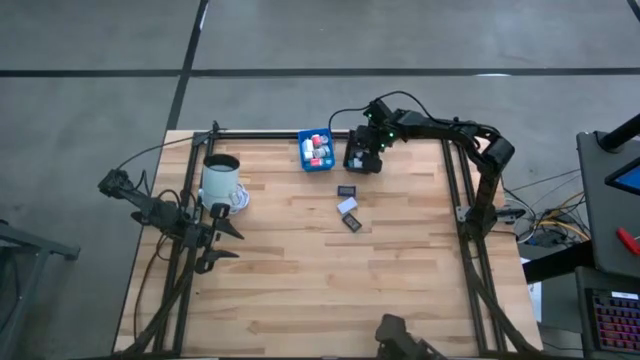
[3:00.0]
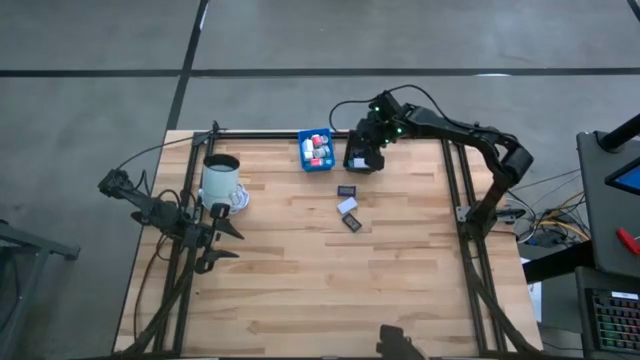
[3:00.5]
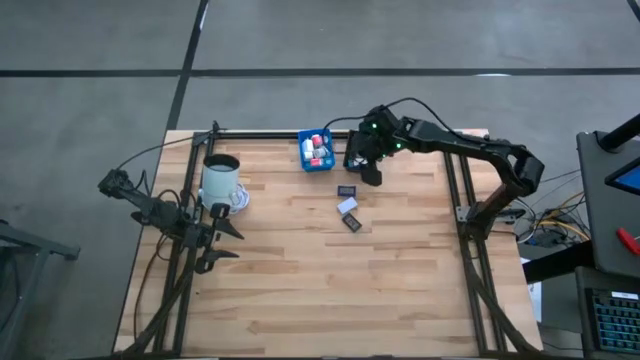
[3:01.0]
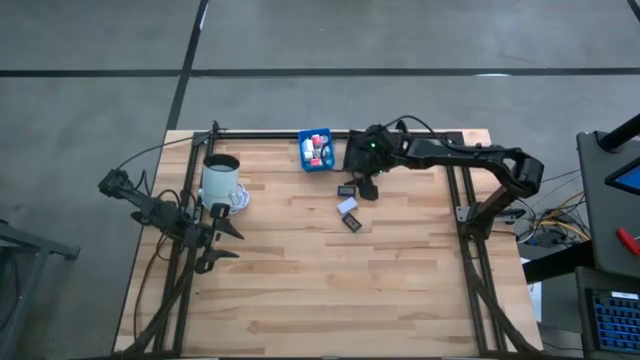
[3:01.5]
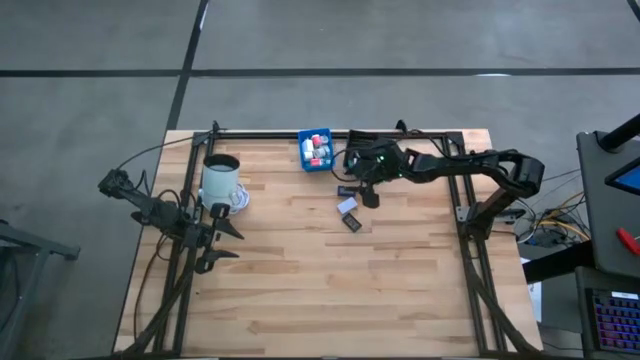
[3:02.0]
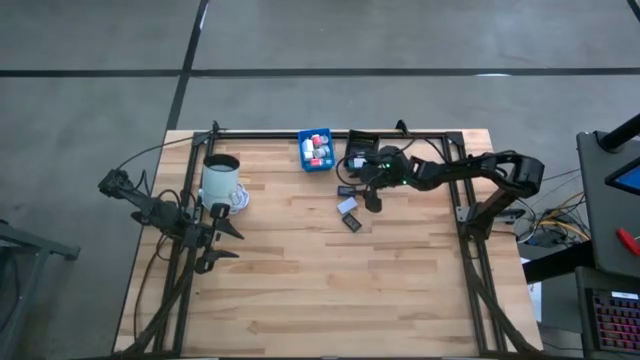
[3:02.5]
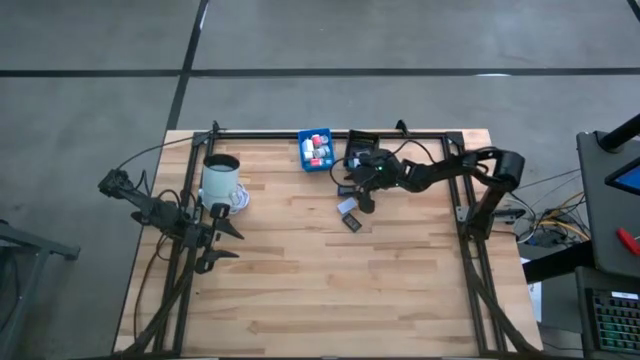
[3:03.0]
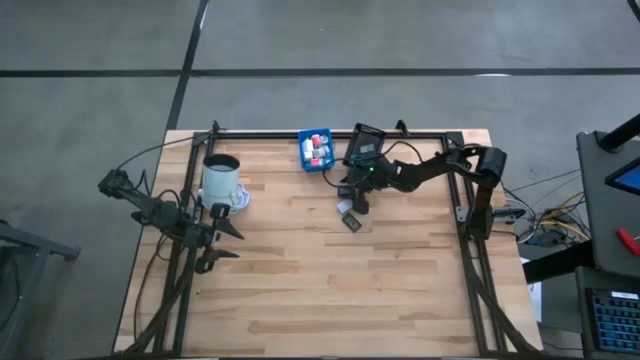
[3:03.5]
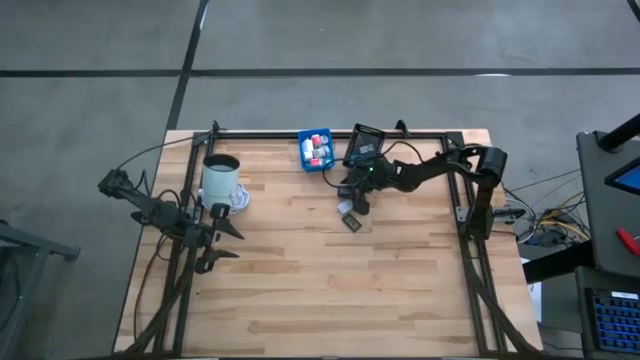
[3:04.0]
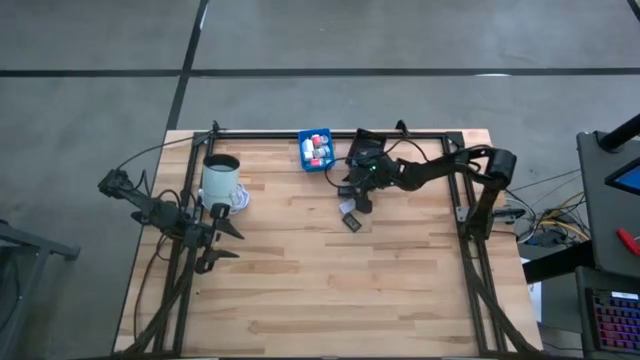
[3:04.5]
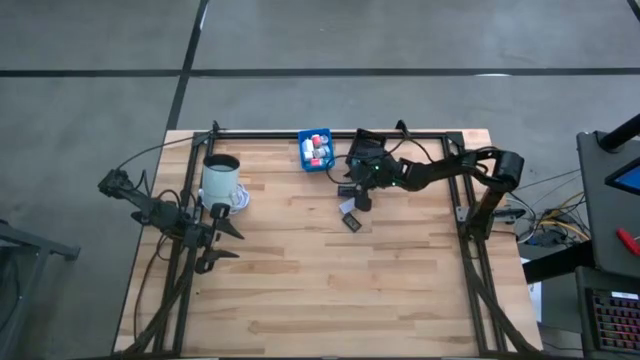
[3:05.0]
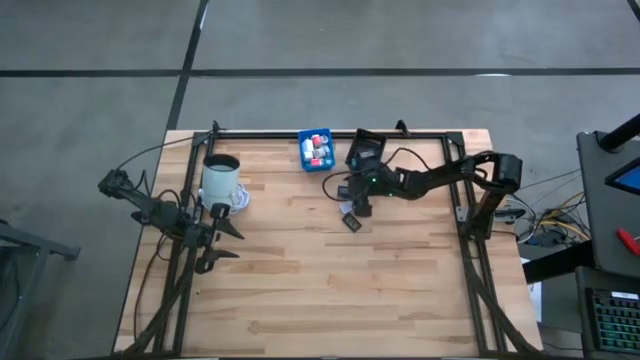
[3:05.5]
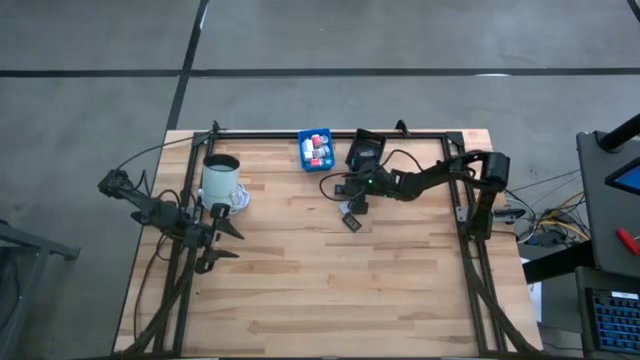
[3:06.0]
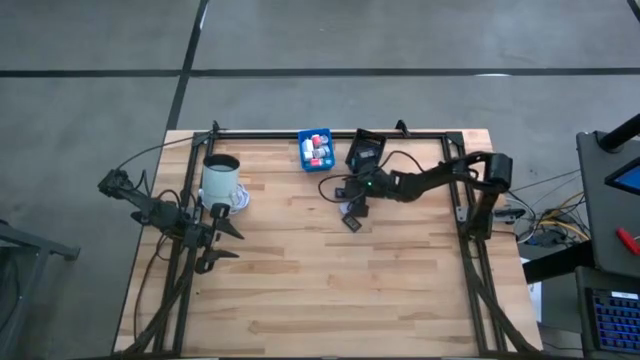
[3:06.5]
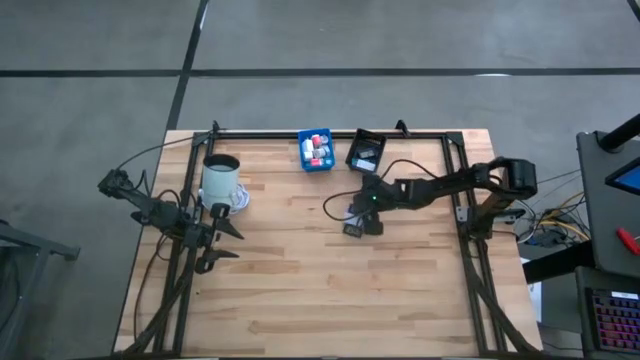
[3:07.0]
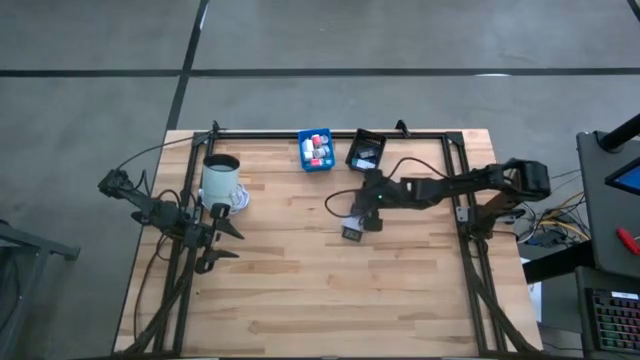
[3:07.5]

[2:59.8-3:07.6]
Task: Pick & Place Office items
Put the purple digital clock into the black basket

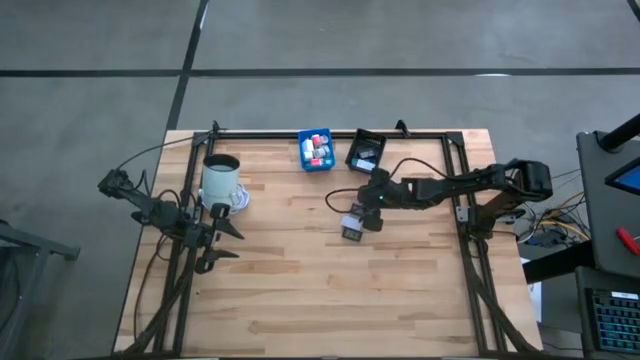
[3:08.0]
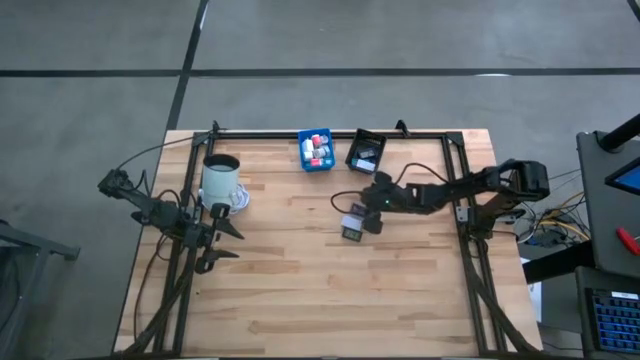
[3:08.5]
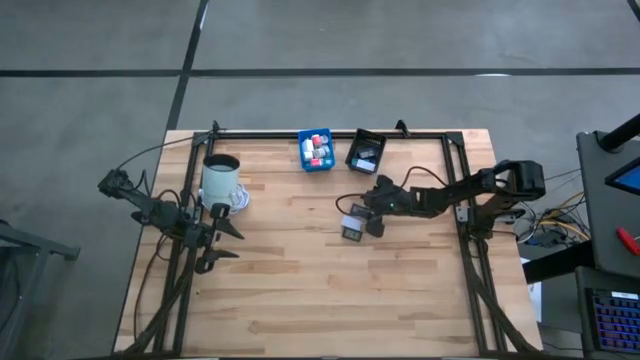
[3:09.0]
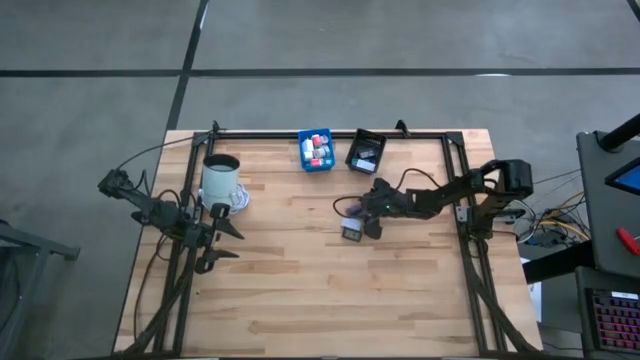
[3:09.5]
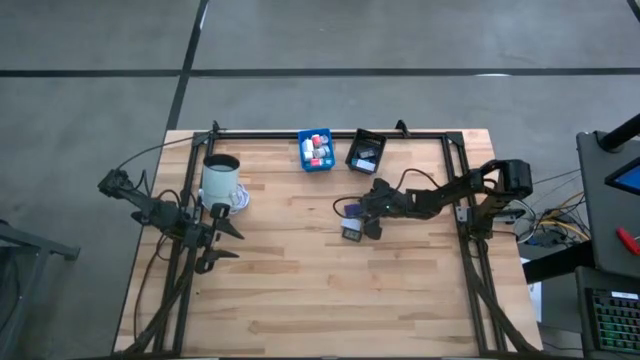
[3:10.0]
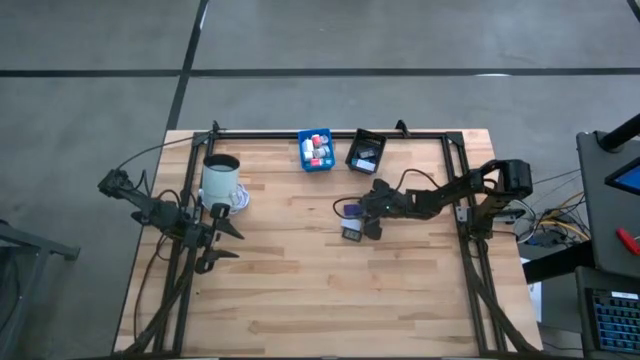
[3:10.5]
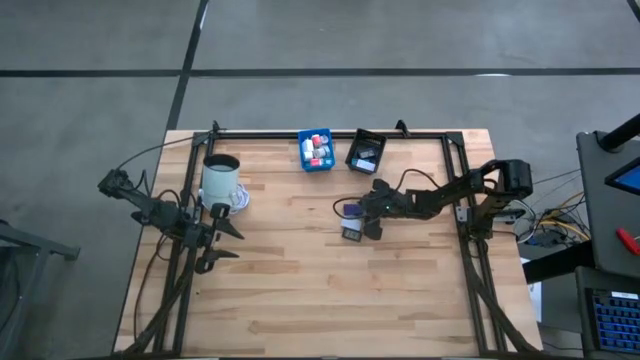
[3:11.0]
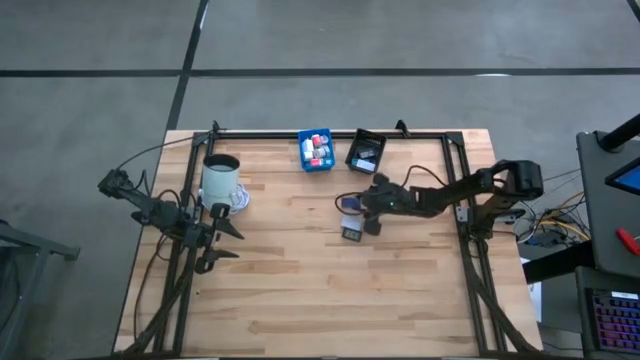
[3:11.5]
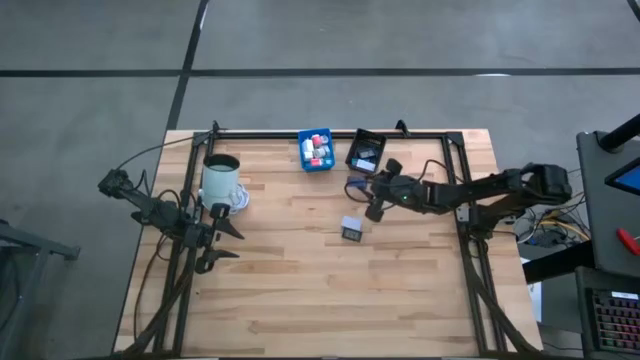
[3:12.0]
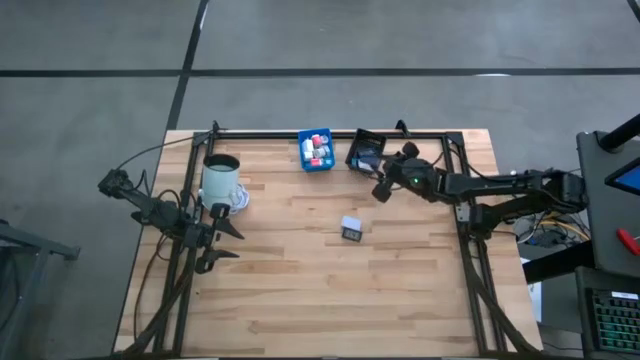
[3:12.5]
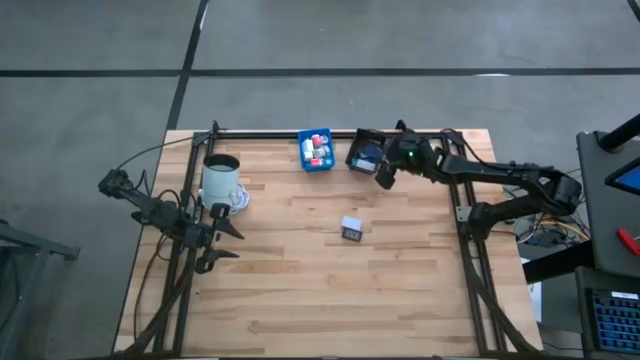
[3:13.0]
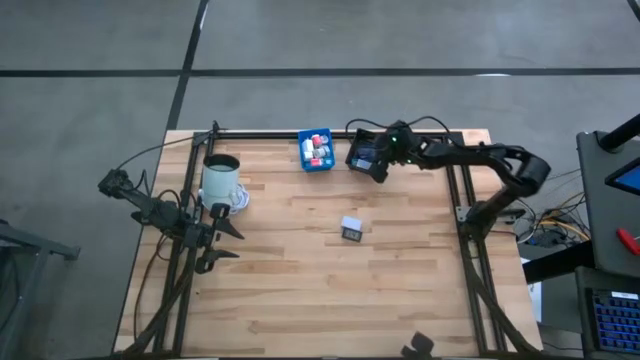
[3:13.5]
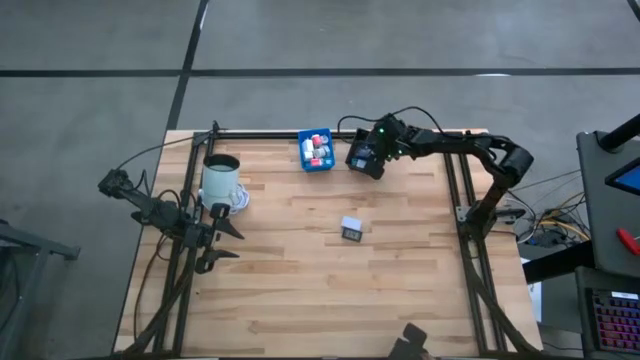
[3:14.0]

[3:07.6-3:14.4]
Put the purple digital clock into the black basket

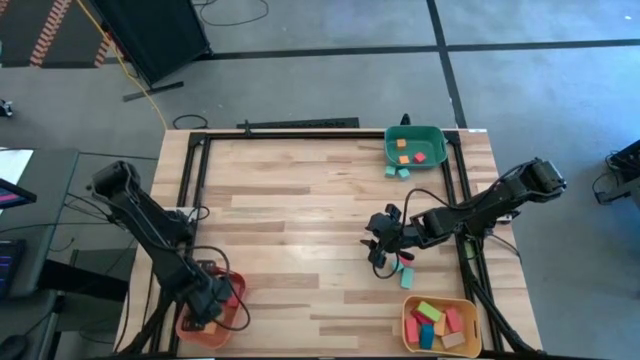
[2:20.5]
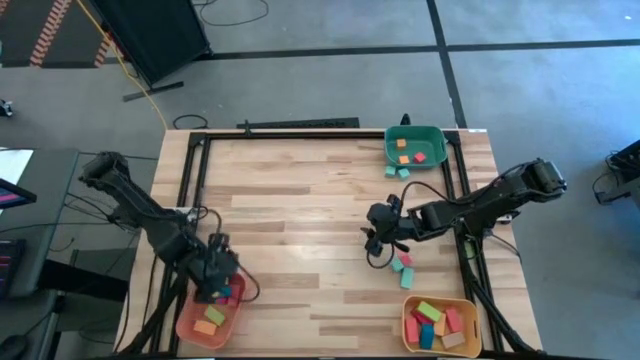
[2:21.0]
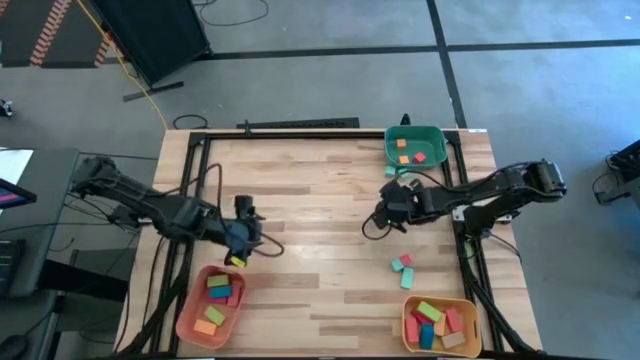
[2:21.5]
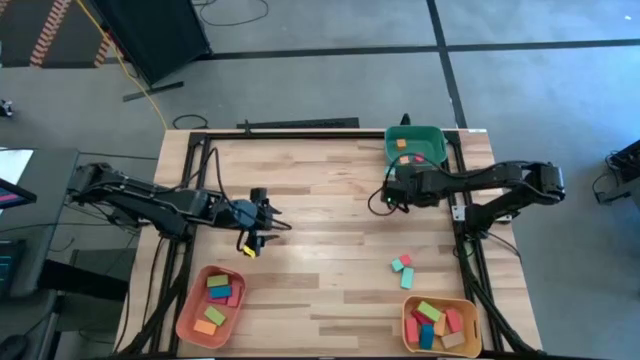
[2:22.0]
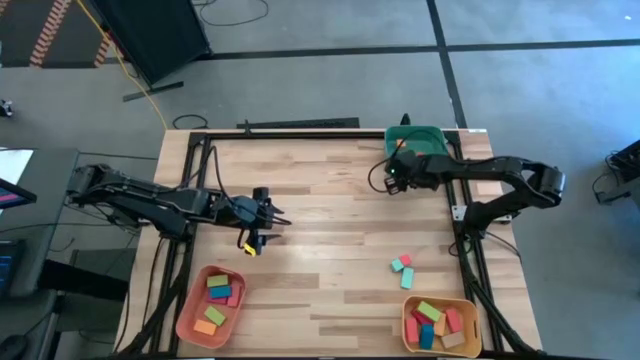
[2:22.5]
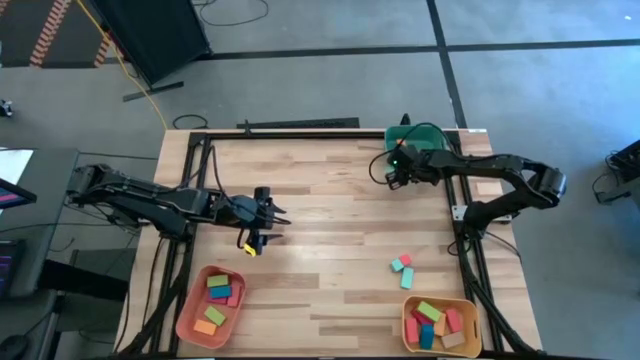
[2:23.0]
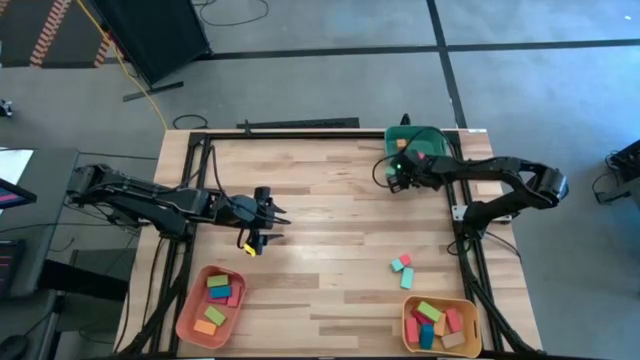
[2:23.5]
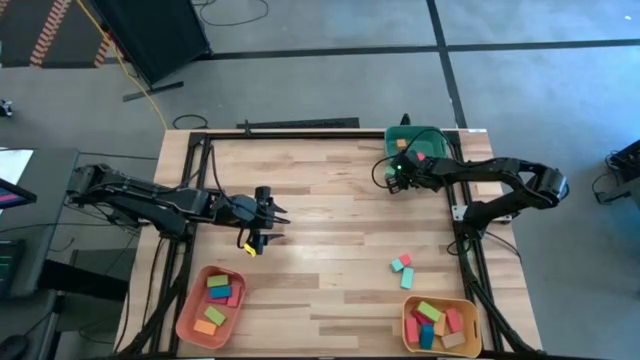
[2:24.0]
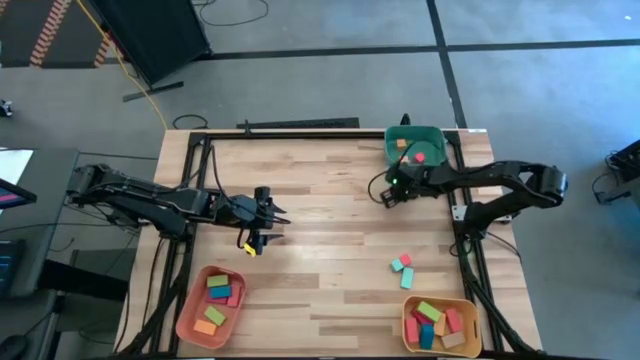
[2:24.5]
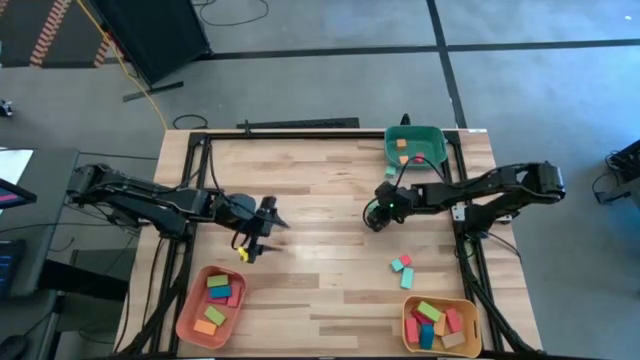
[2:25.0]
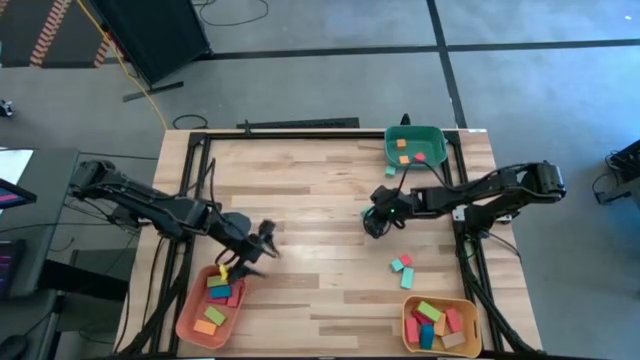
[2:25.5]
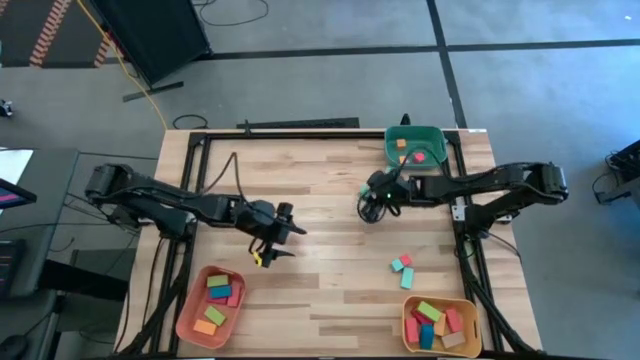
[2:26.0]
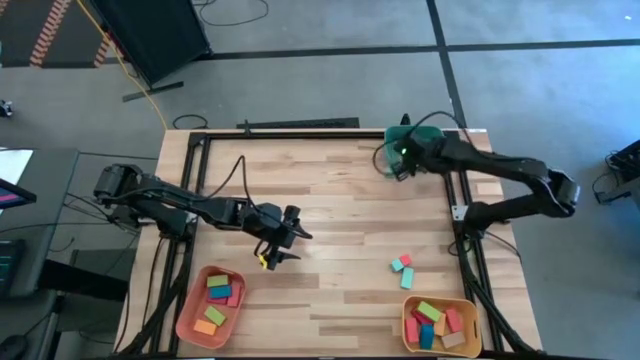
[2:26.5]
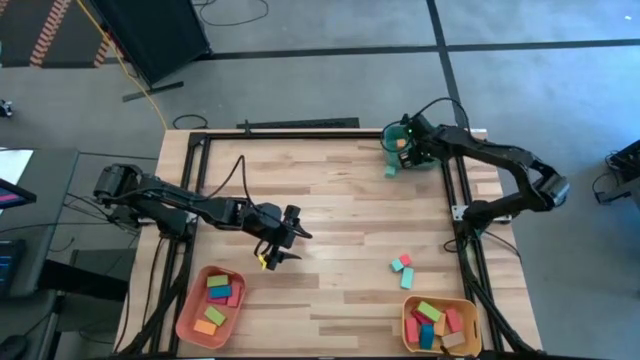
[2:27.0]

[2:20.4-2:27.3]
Task: Sort blocks by size
Put the small blue square block into the blue bin
